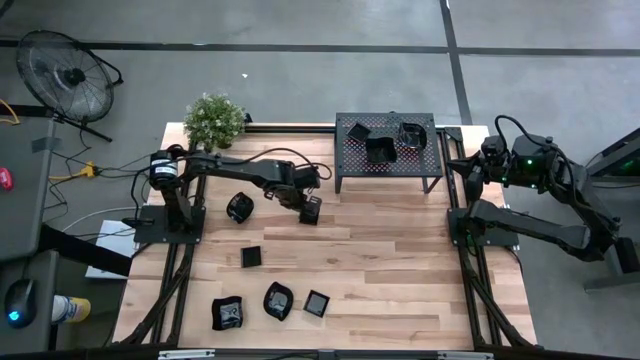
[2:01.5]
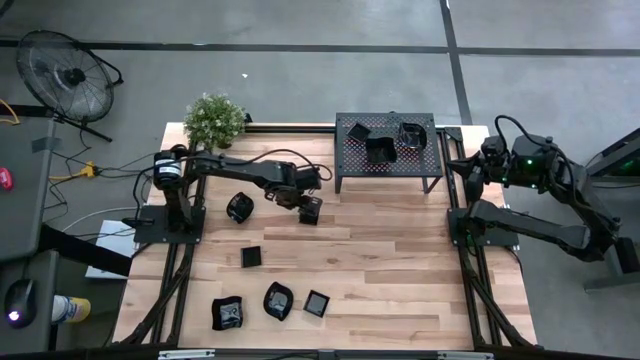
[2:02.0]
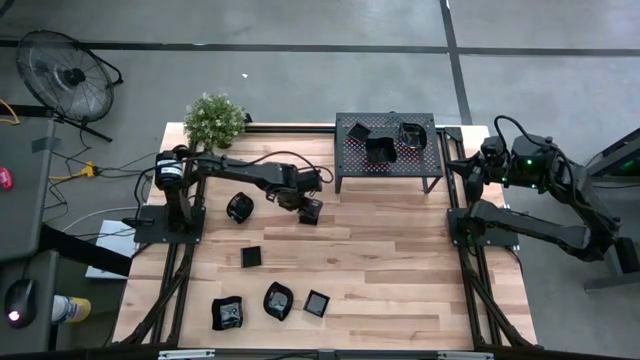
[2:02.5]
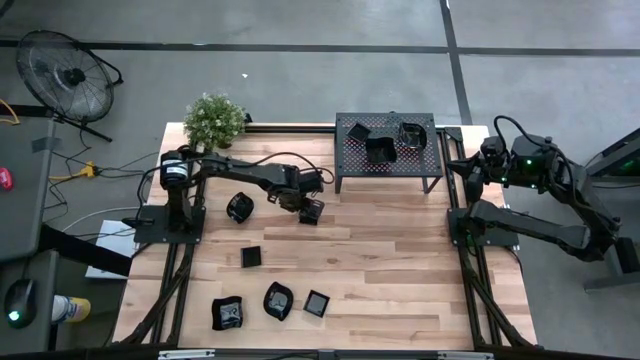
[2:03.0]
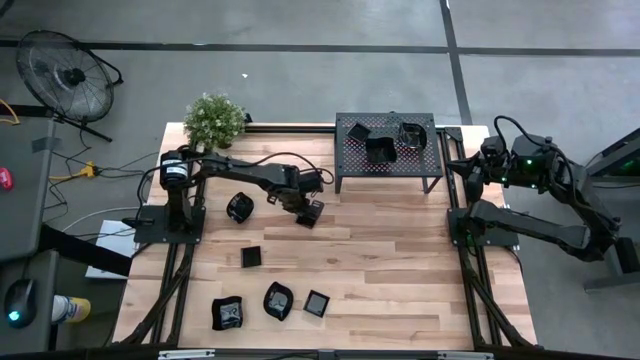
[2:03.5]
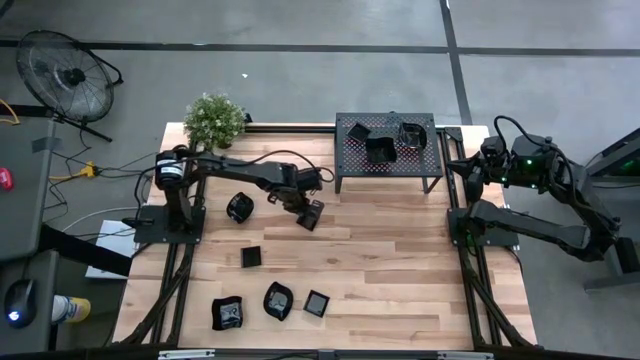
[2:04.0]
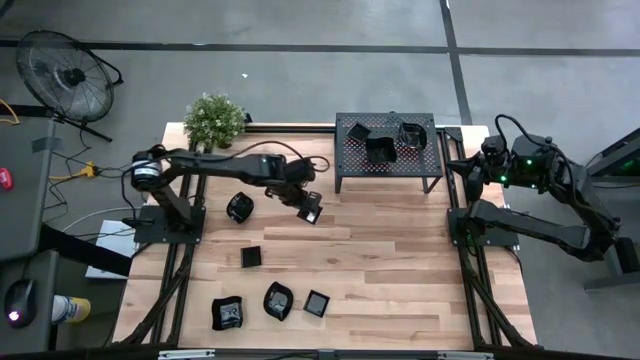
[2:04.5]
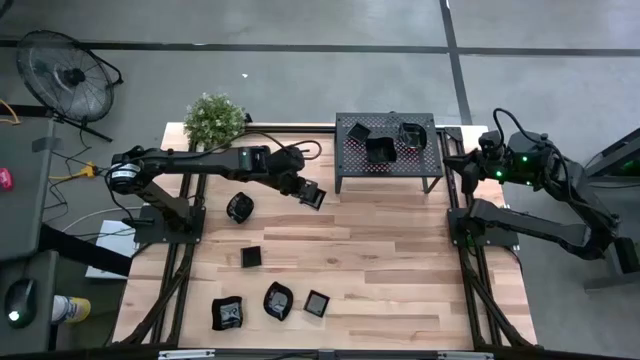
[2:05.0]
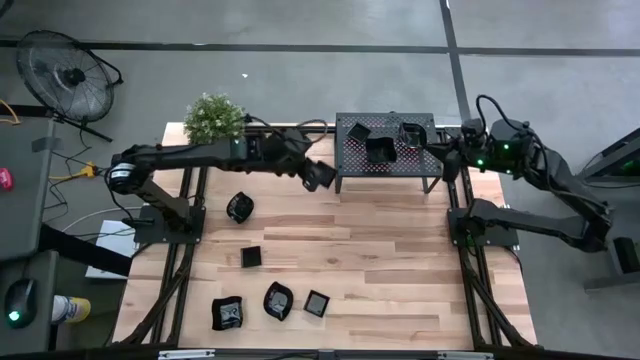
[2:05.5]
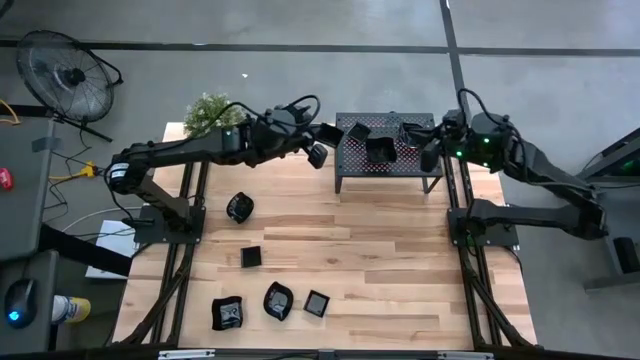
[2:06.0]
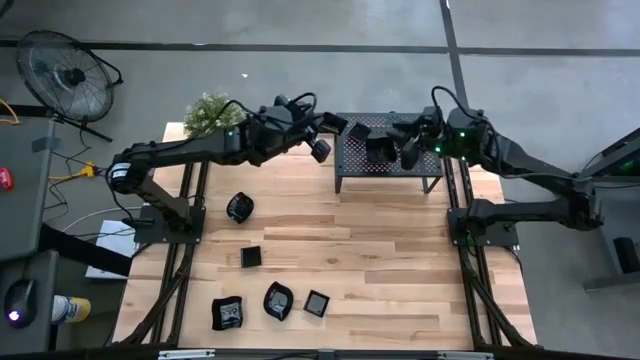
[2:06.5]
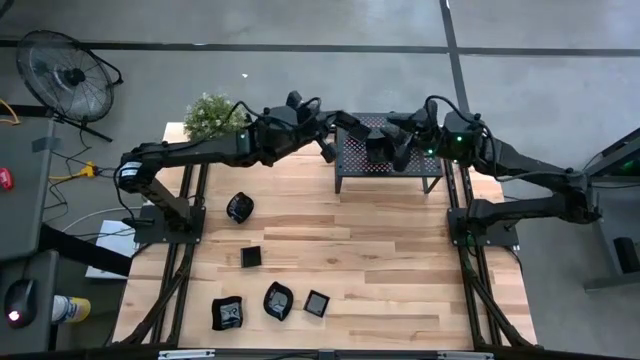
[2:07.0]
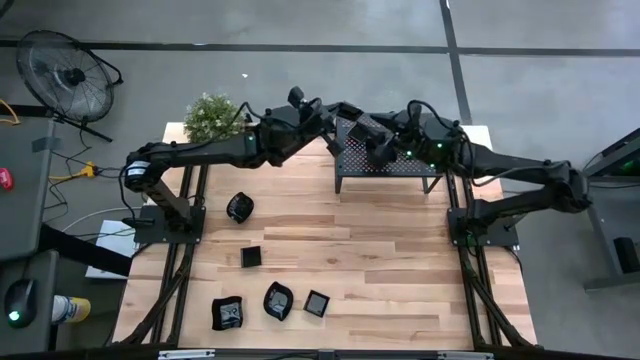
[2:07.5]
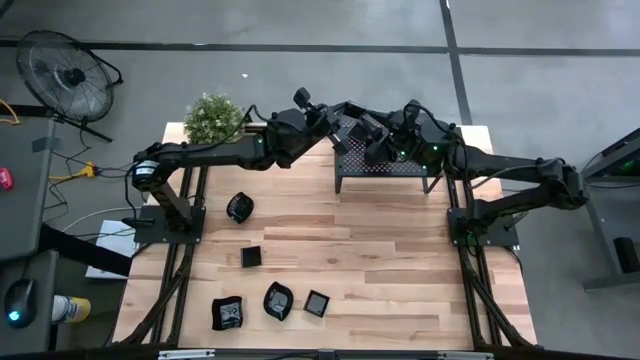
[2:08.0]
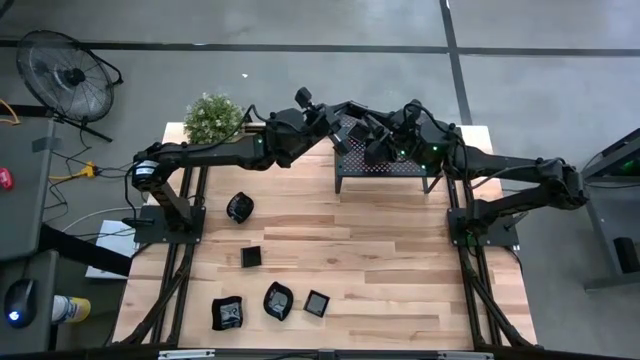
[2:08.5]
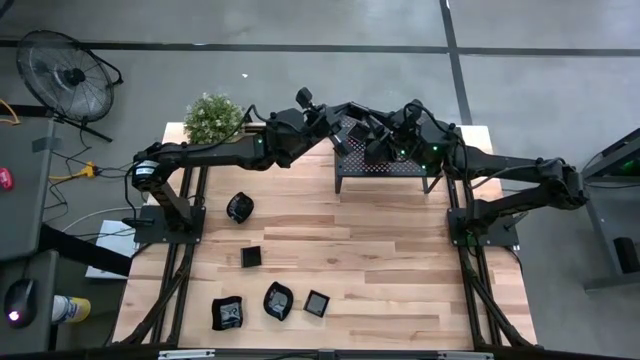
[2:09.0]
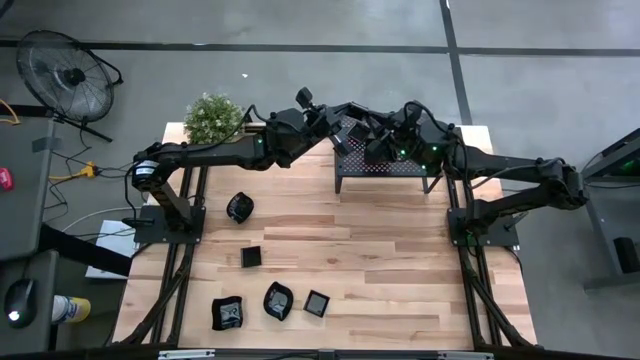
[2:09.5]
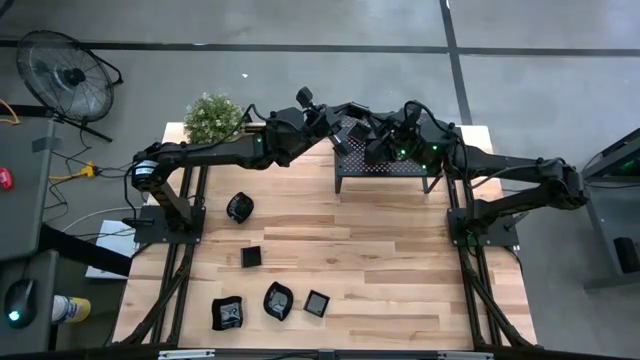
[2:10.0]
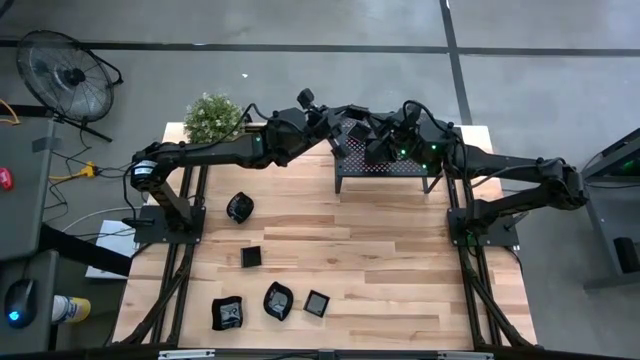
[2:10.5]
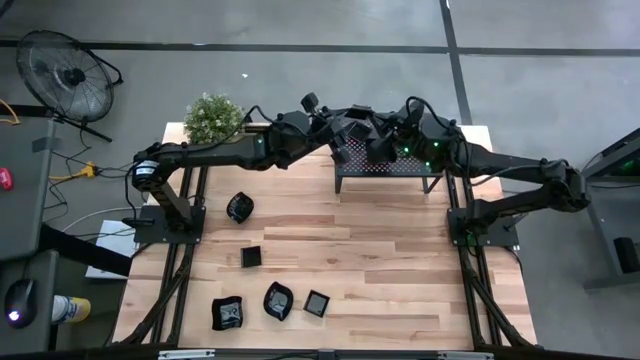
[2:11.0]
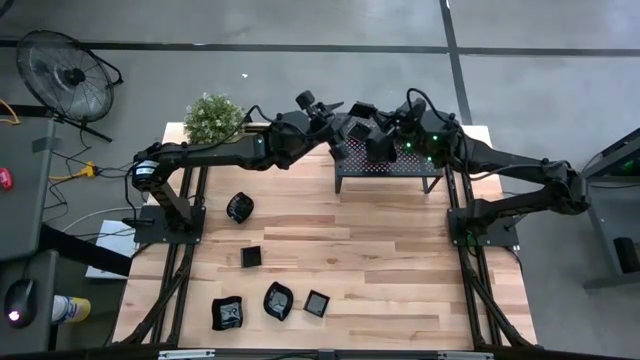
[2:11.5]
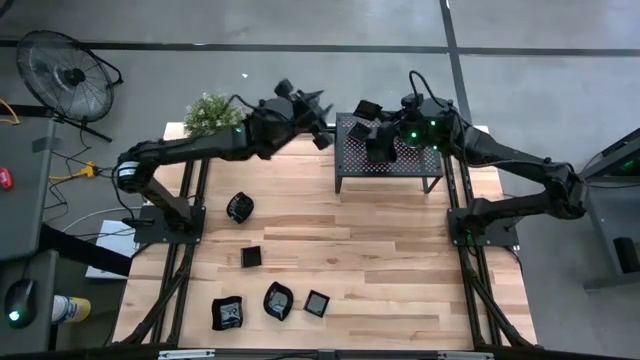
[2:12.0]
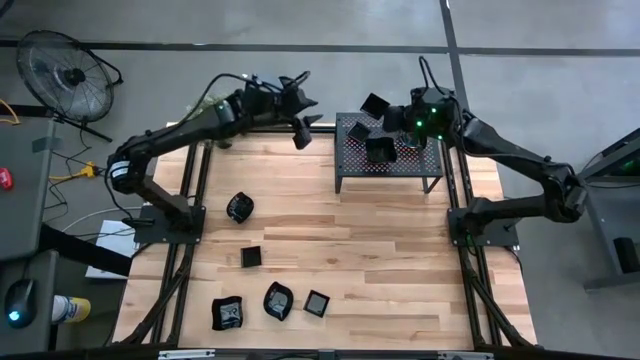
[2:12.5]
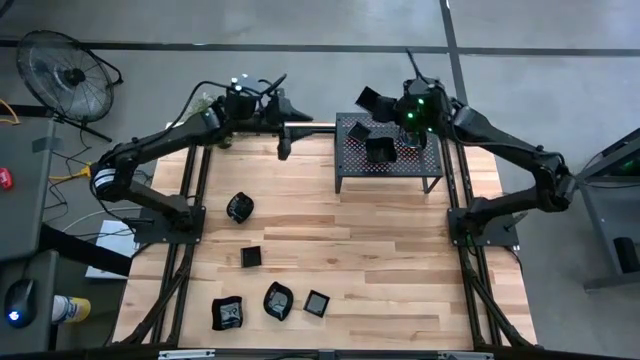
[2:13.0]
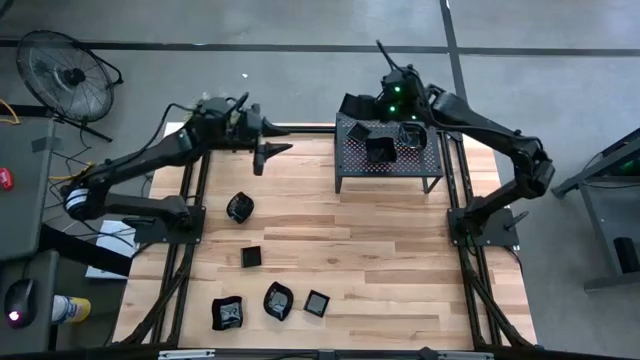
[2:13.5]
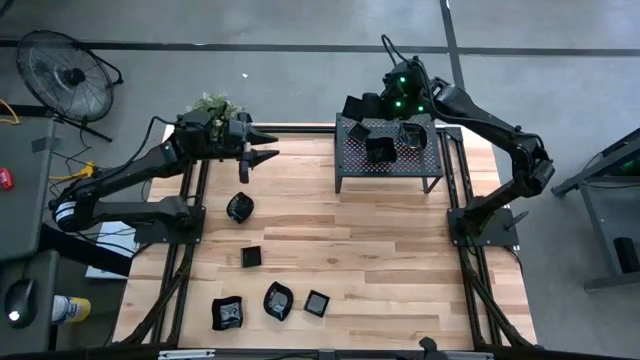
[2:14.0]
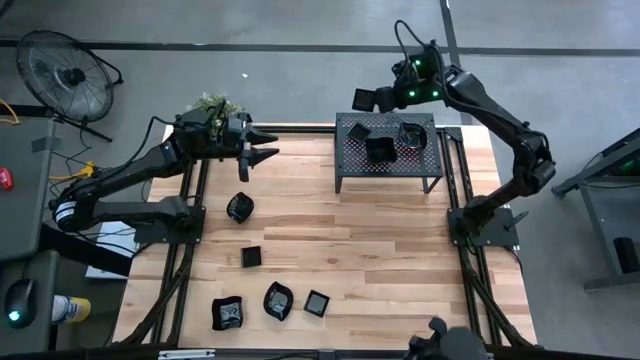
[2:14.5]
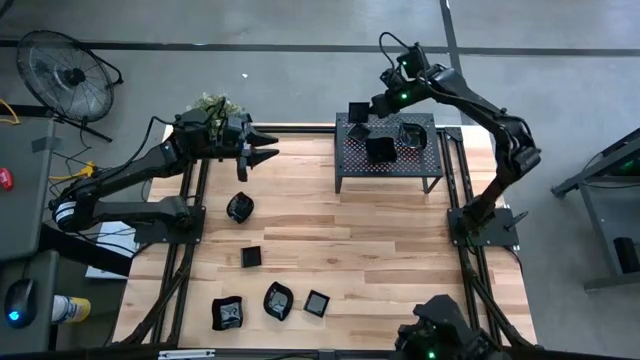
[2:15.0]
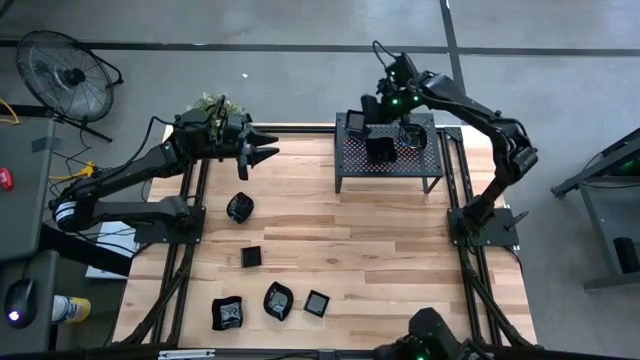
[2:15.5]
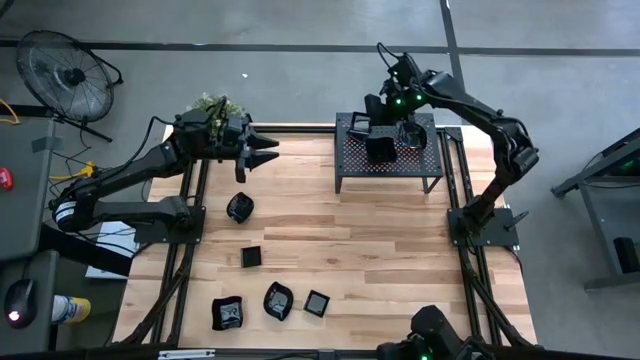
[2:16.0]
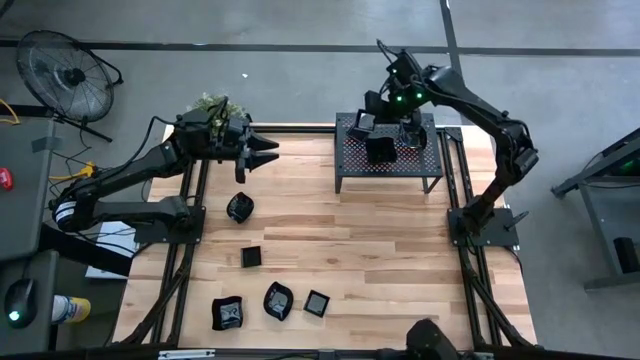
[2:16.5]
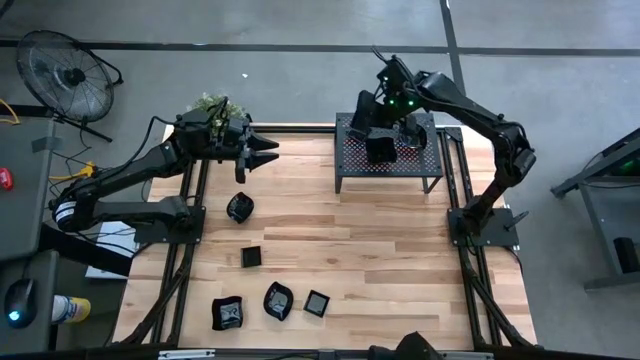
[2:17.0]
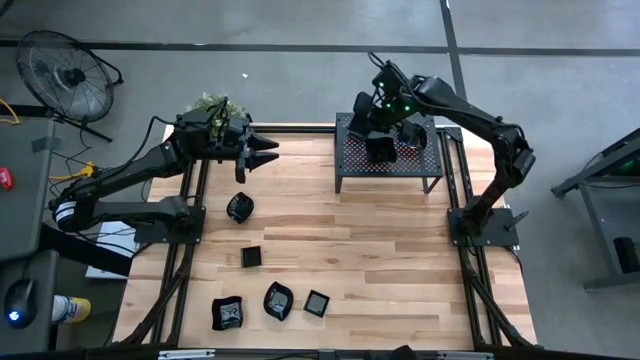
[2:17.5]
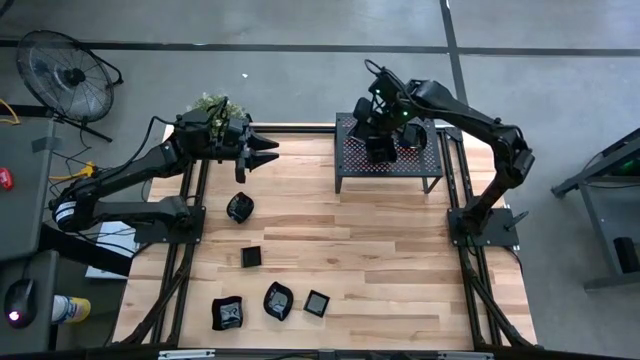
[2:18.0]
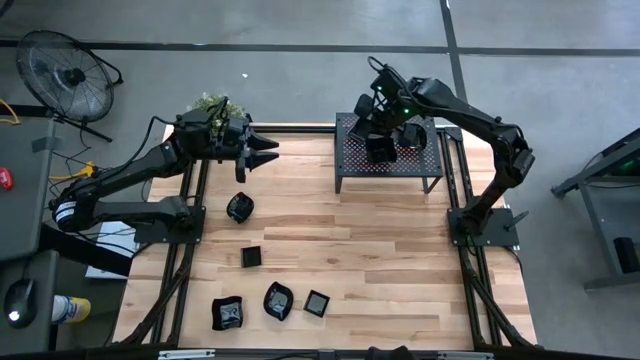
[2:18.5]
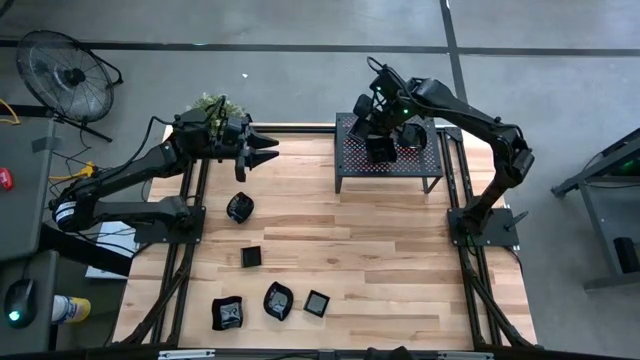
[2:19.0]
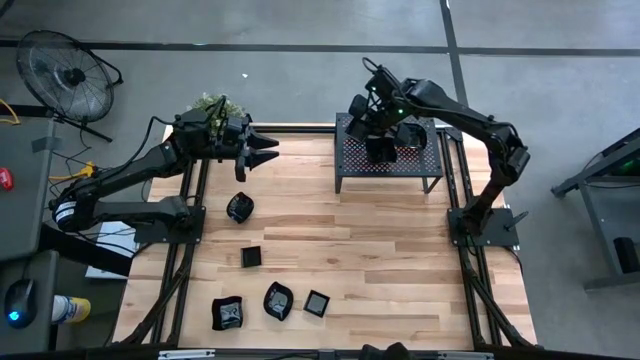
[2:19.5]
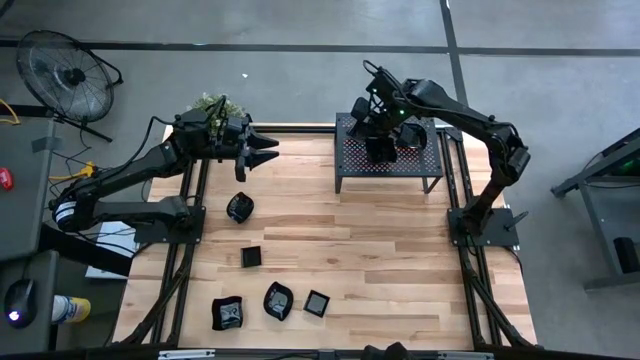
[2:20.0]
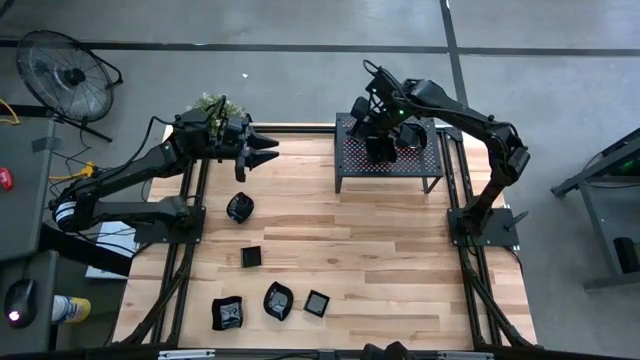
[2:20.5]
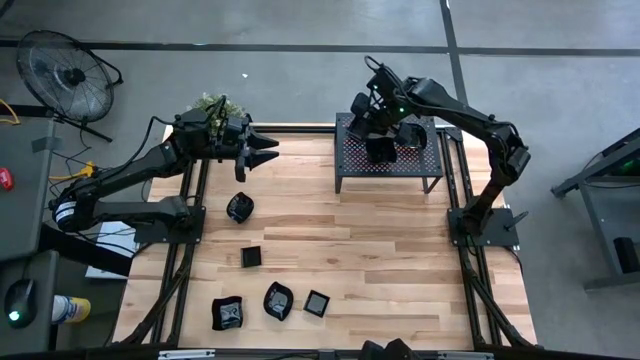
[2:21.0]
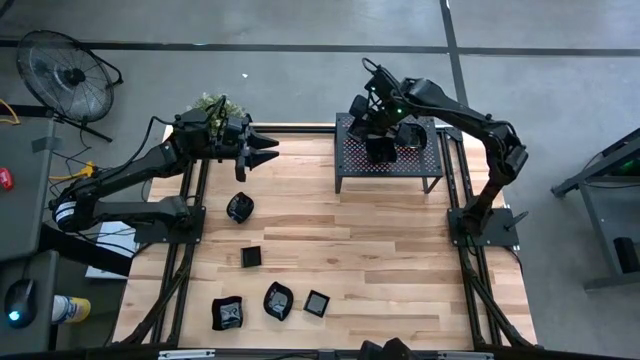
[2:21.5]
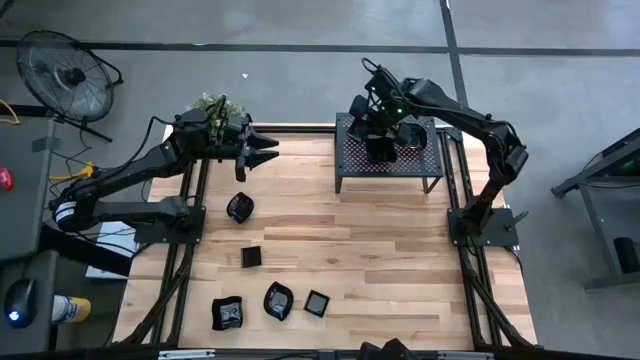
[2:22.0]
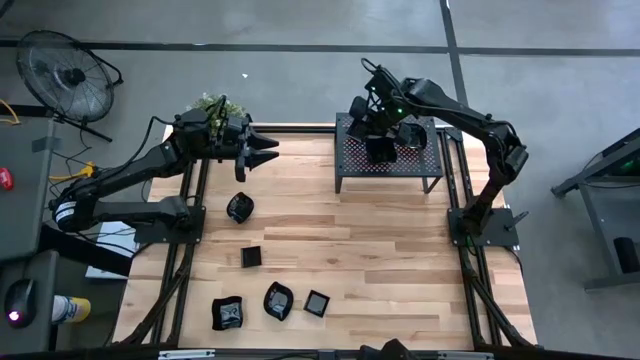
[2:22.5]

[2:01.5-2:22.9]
Task: Pick & Place Mini shaped plates
Stack the black square plate on top of the black square plates on the shelf
